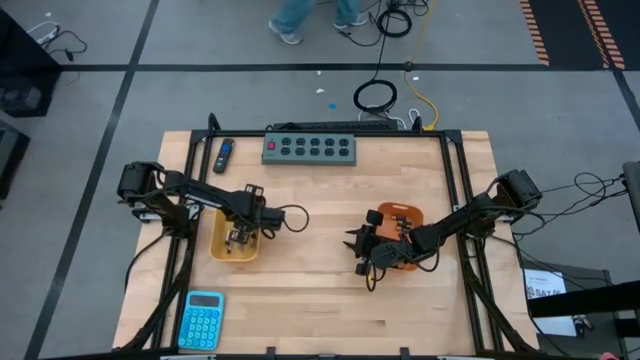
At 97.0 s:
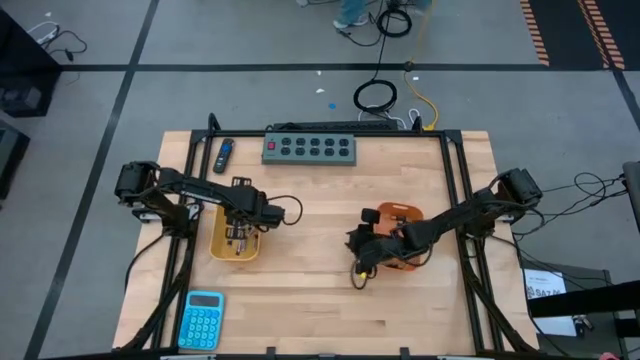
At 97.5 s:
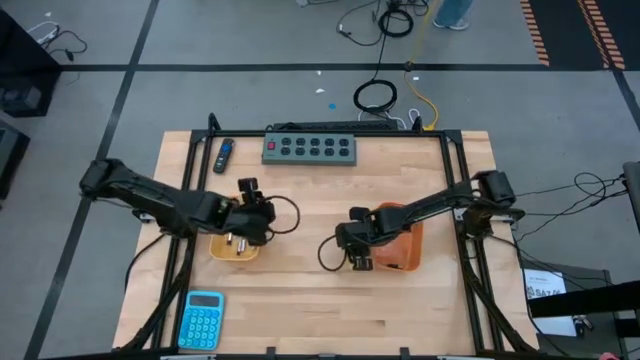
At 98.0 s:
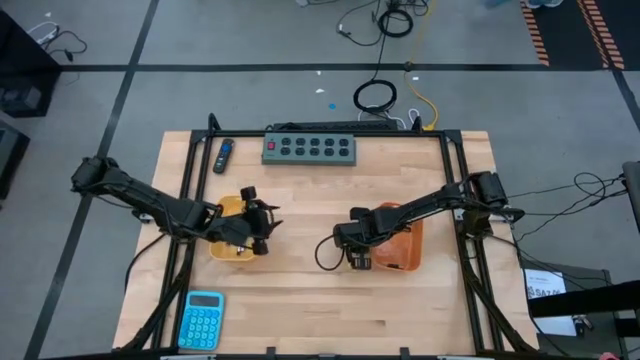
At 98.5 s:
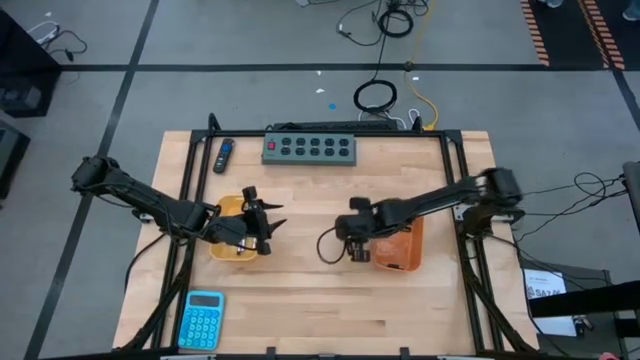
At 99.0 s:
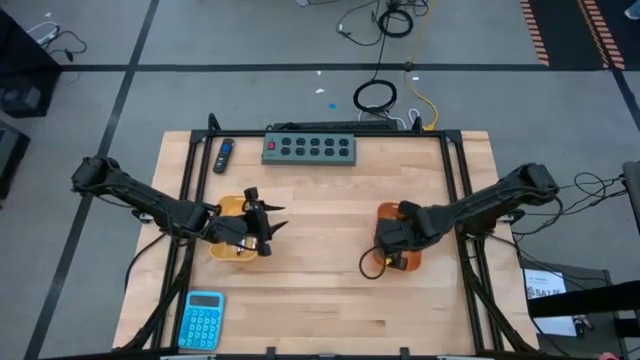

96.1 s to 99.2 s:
Task: Sort batteries
Put the black battery into the orange bin

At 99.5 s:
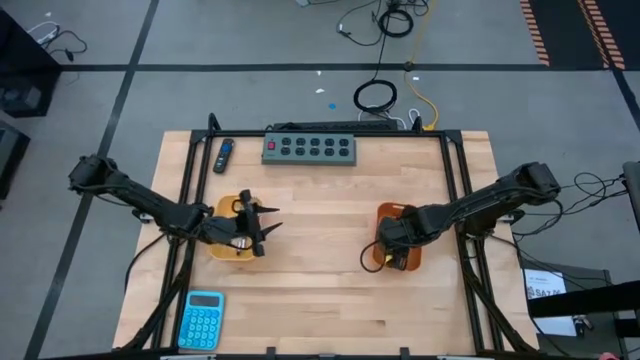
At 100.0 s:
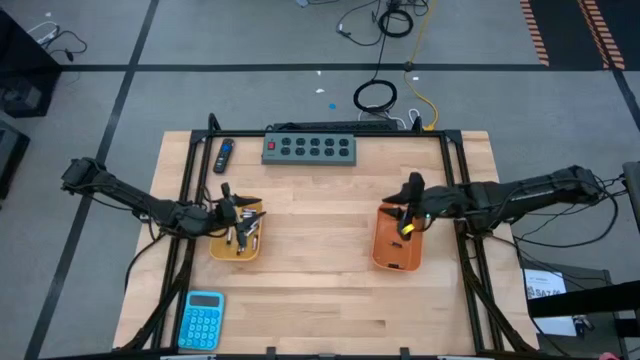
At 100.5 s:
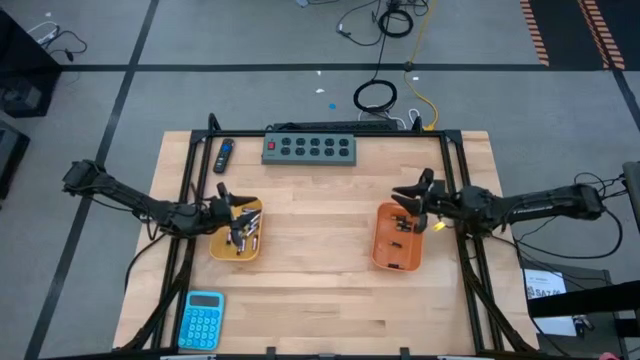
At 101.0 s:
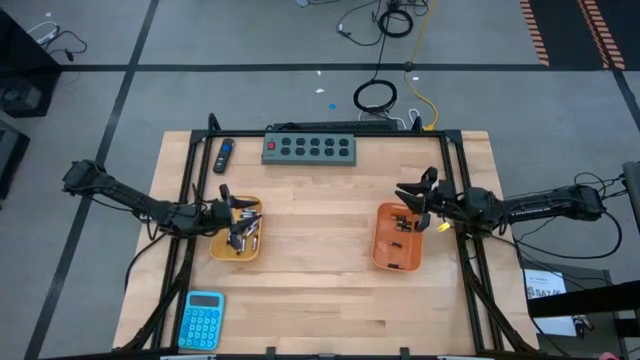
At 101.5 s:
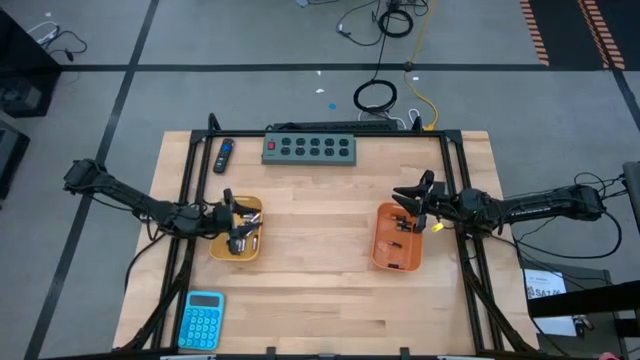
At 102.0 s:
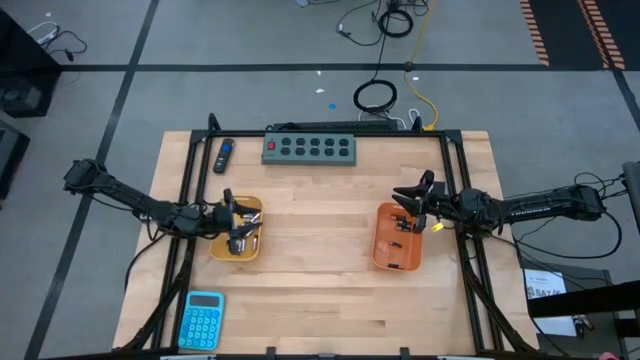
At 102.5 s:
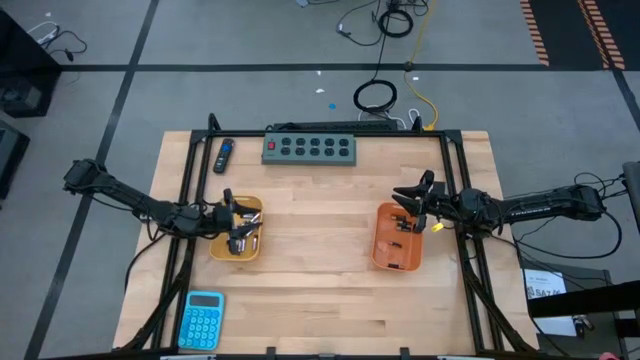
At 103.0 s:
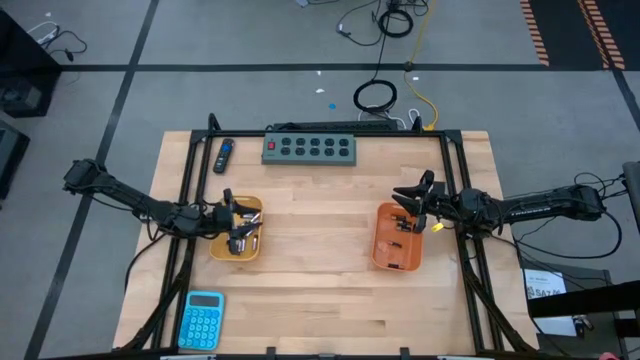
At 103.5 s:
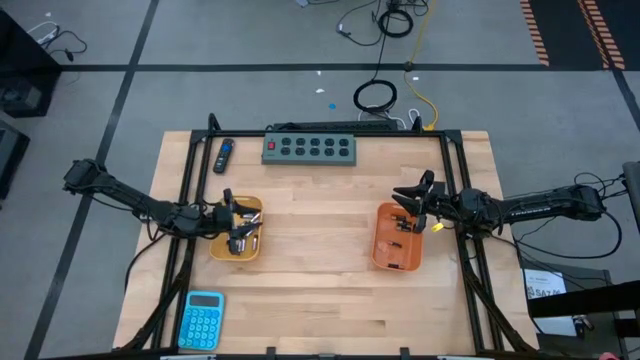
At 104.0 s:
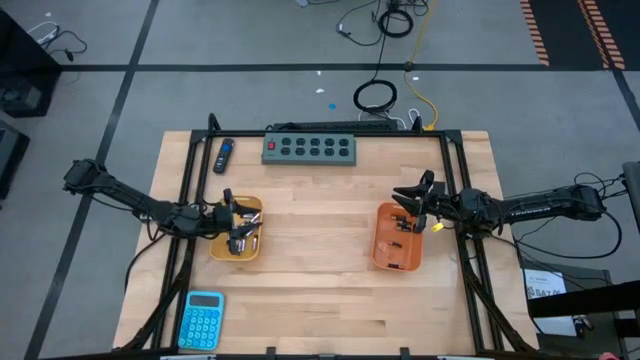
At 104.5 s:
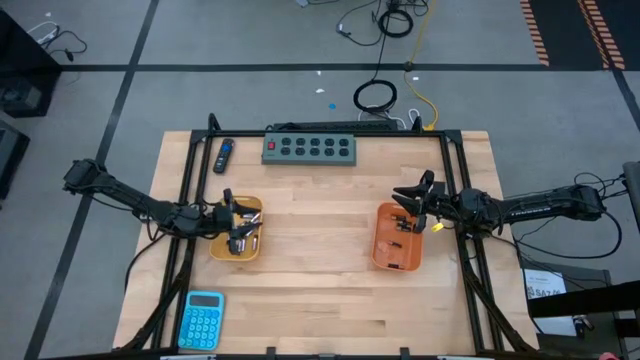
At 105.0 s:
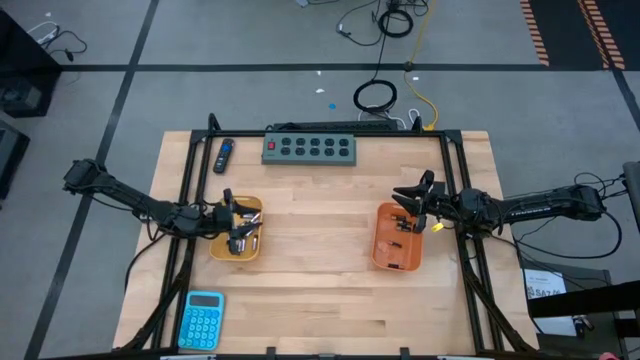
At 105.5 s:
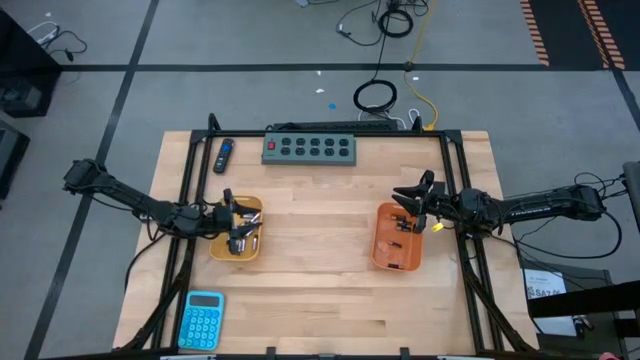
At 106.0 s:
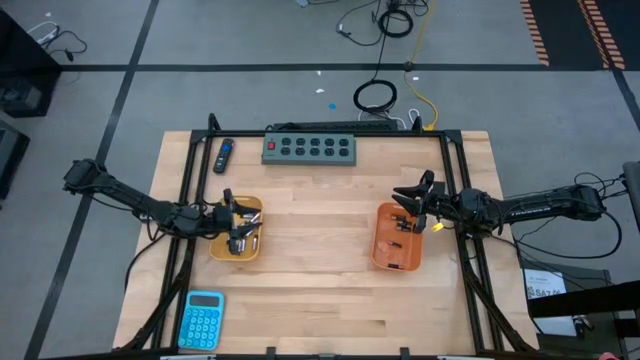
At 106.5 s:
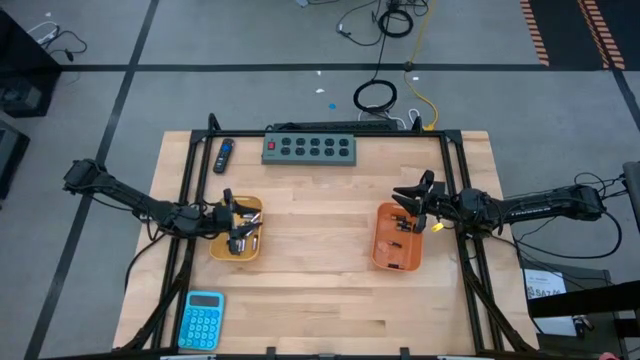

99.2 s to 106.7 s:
Return to home position

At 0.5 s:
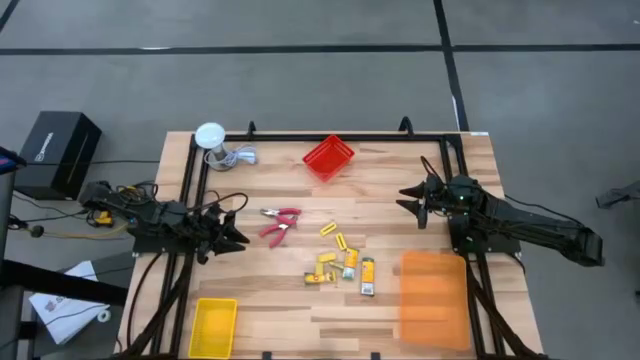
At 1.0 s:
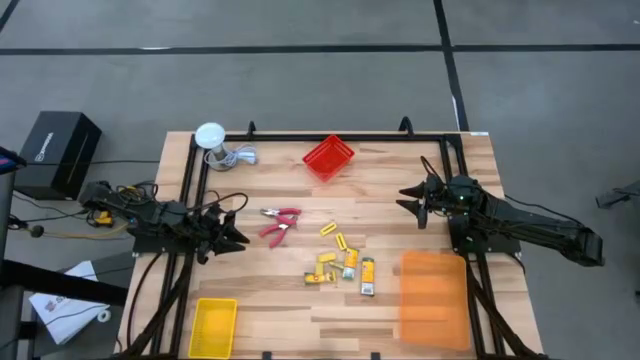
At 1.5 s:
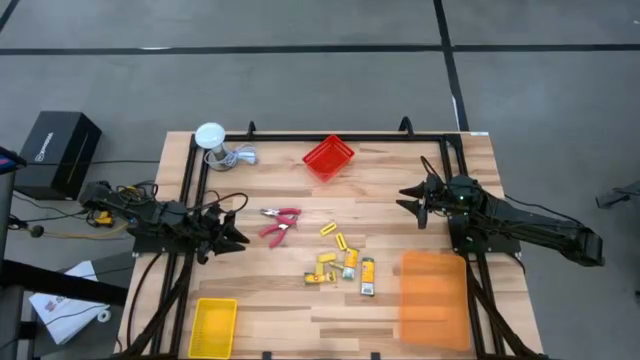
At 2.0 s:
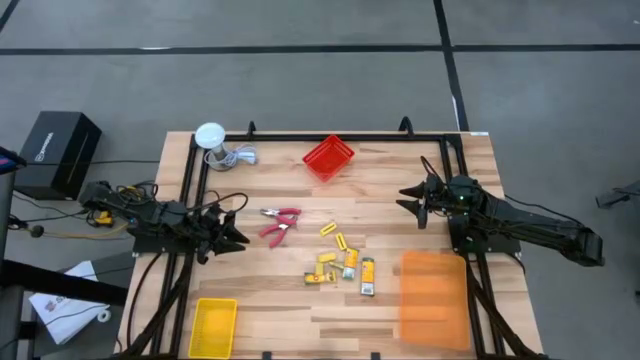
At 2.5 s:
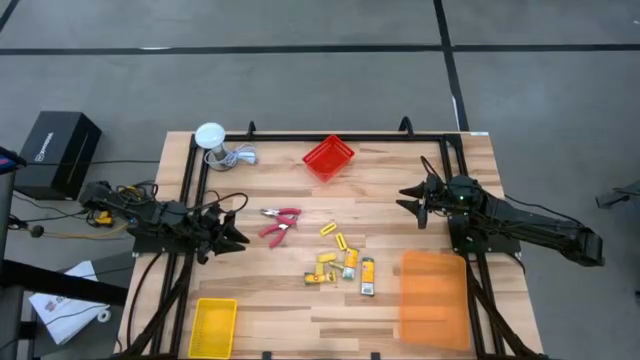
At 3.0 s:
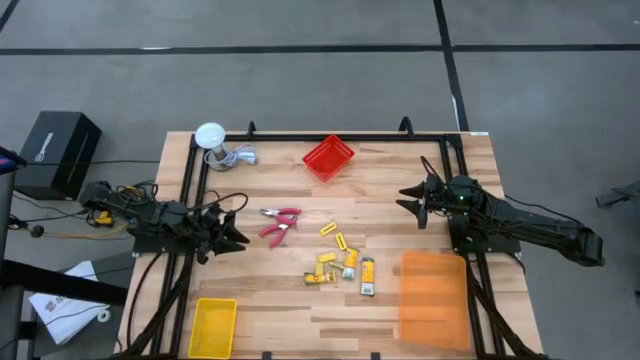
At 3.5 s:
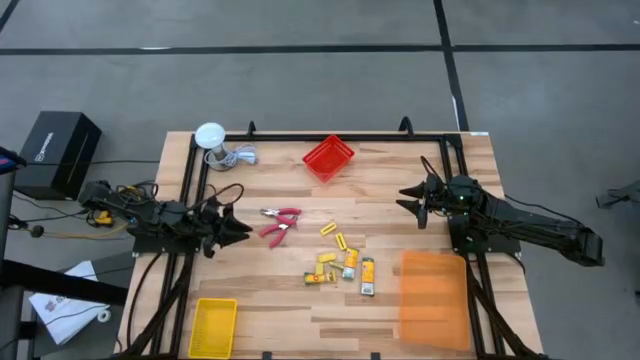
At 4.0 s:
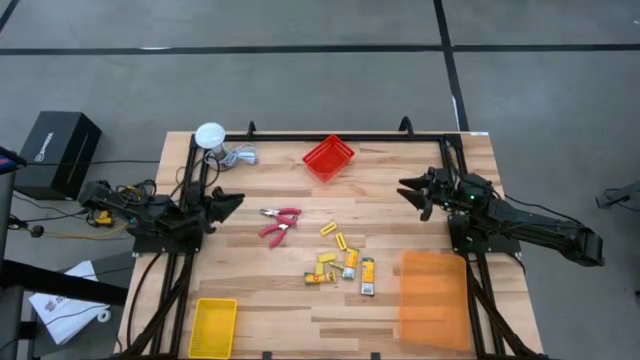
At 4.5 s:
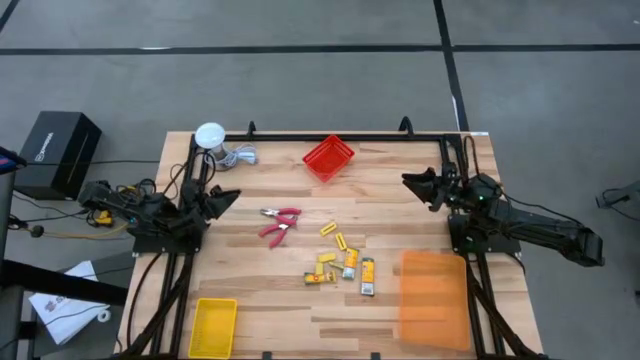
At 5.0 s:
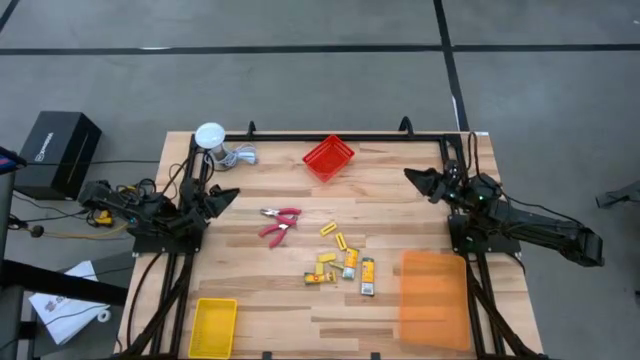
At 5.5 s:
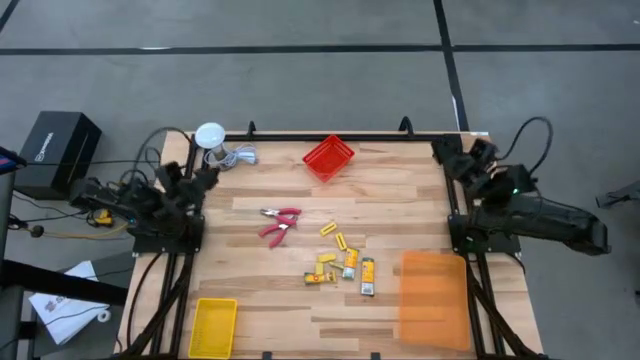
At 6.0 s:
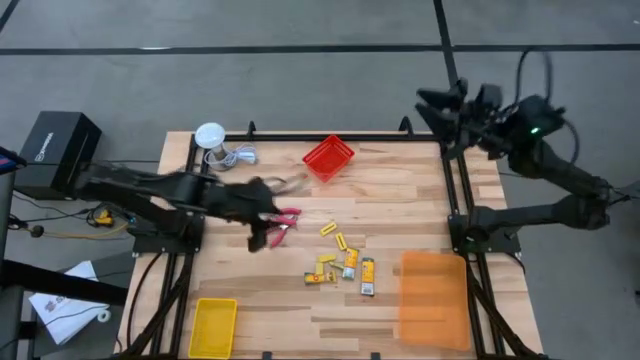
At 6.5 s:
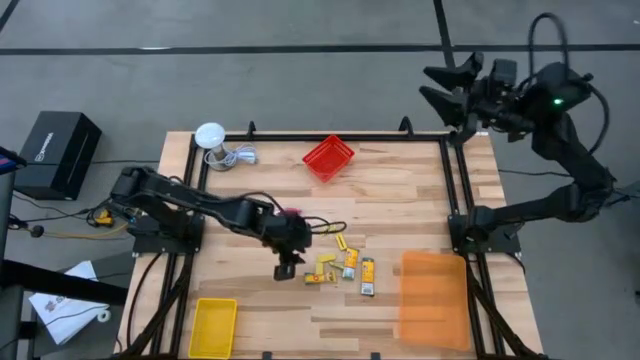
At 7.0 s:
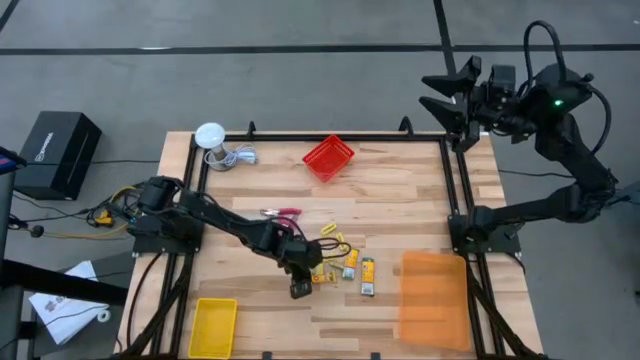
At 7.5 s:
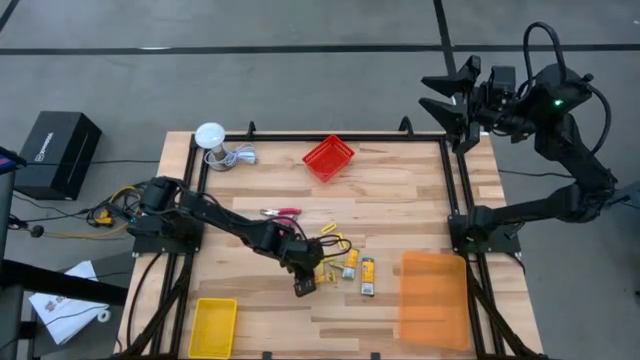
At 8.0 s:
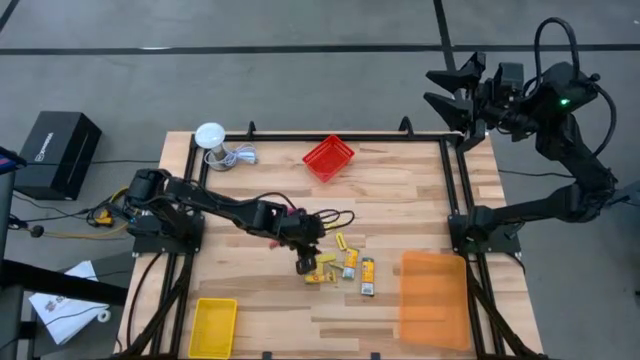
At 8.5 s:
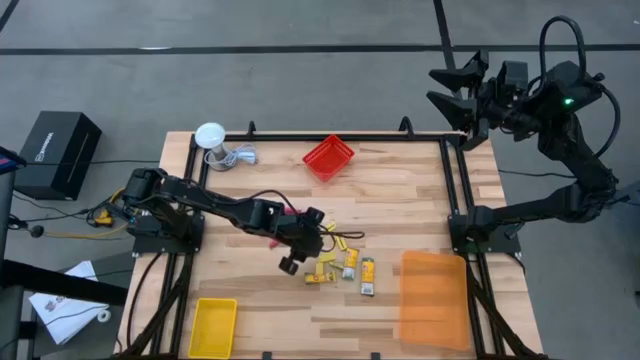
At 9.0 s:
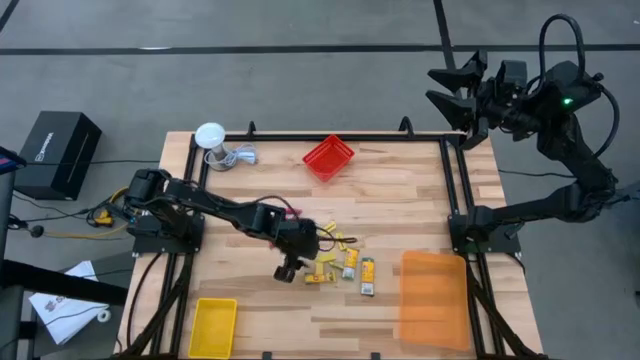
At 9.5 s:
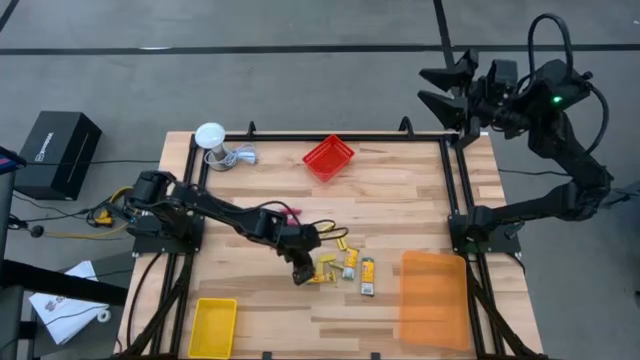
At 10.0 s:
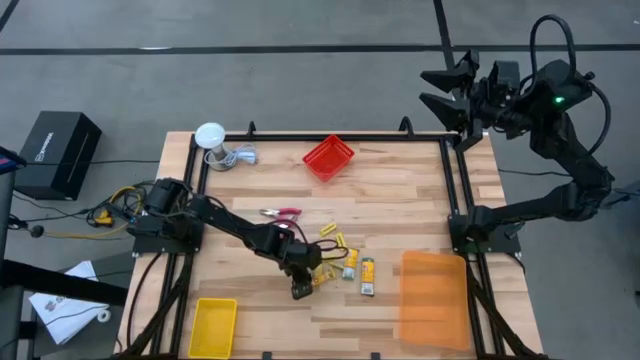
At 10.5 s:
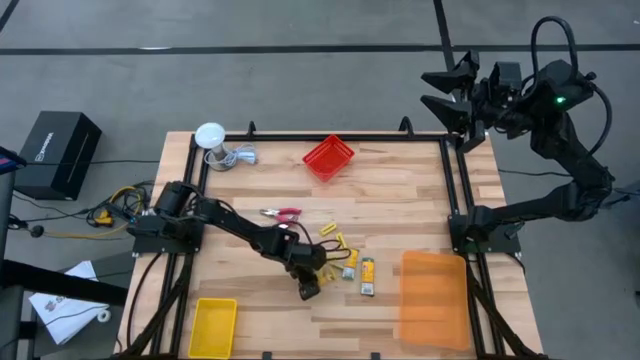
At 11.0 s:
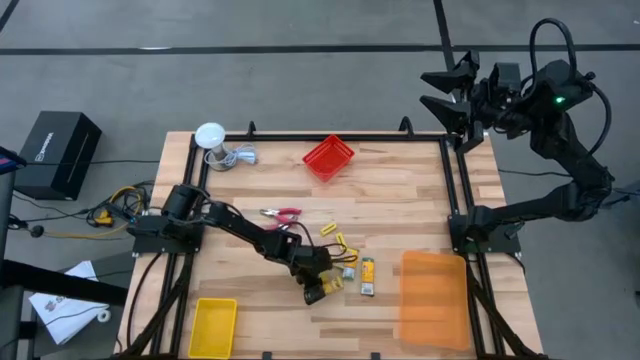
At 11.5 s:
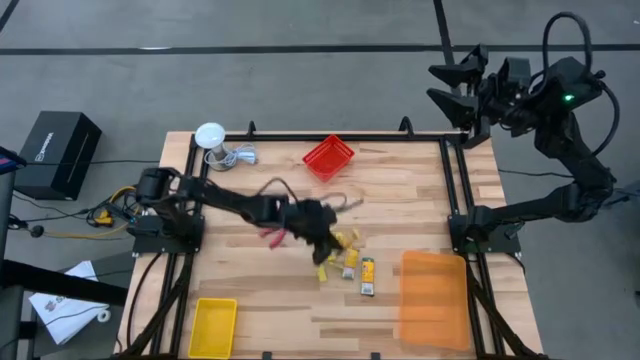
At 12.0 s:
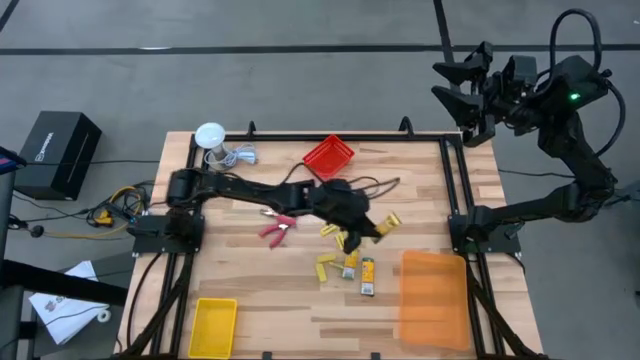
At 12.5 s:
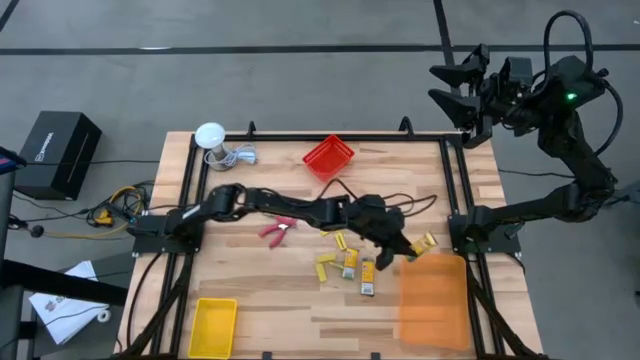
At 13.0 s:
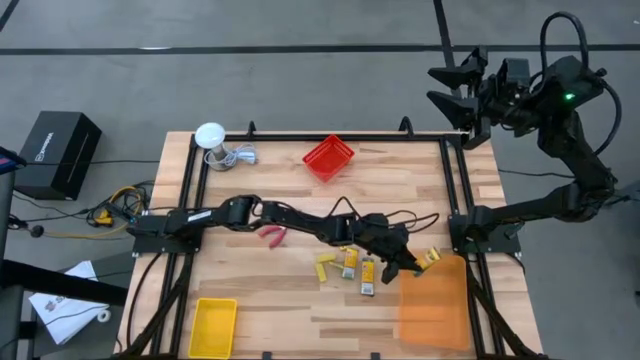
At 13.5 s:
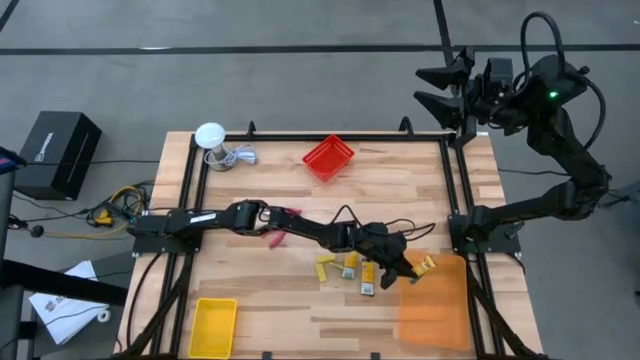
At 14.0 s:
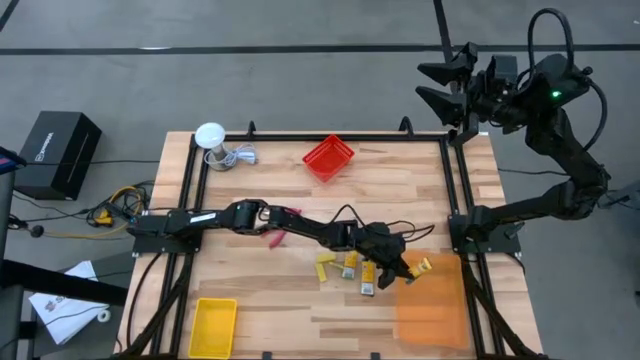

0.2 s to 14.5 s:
Task: Pick & Place School Supplies
Put the crayon box into the orange bin
